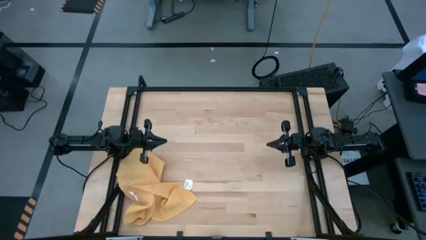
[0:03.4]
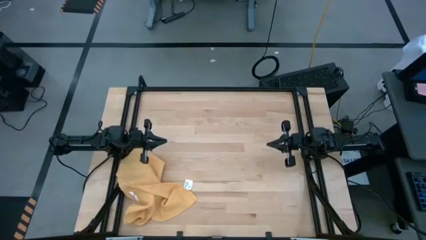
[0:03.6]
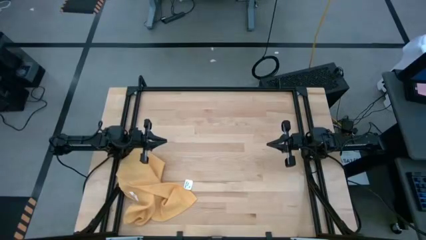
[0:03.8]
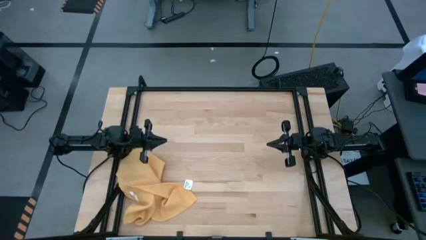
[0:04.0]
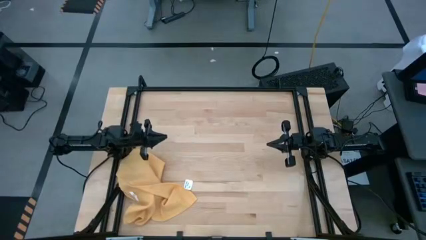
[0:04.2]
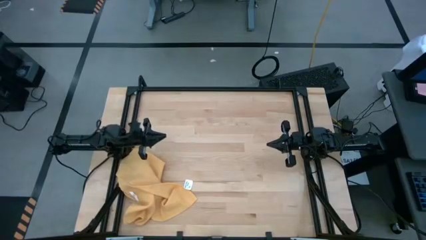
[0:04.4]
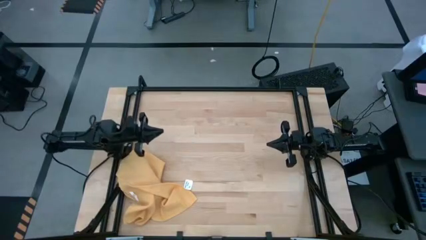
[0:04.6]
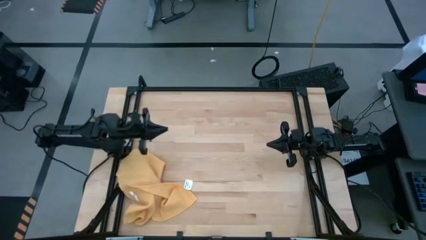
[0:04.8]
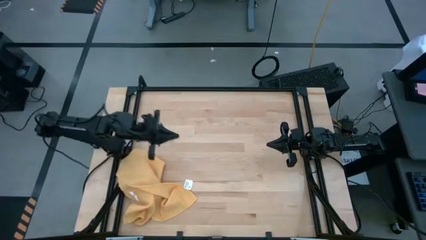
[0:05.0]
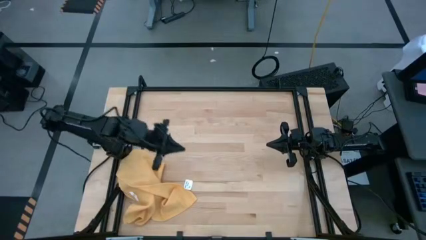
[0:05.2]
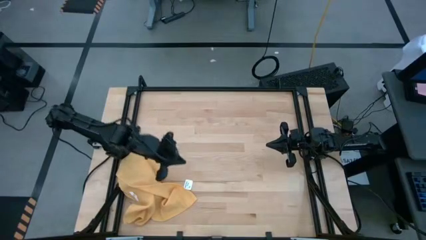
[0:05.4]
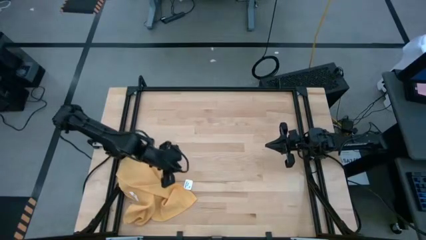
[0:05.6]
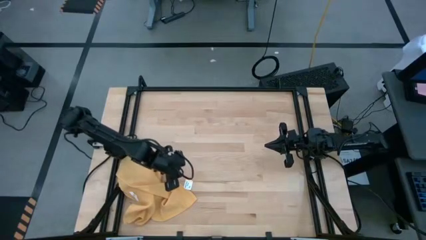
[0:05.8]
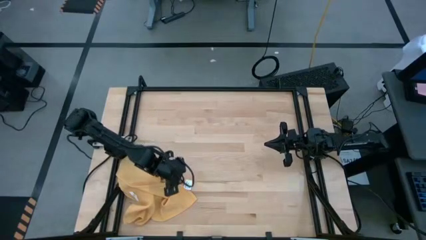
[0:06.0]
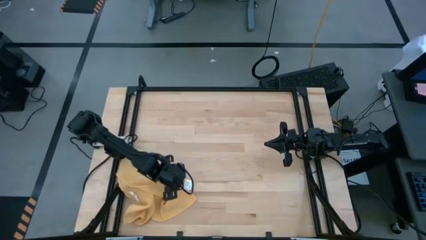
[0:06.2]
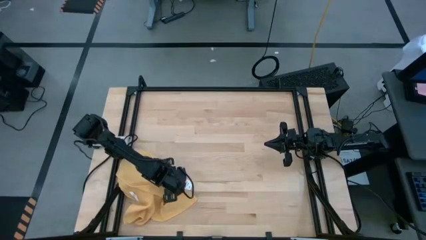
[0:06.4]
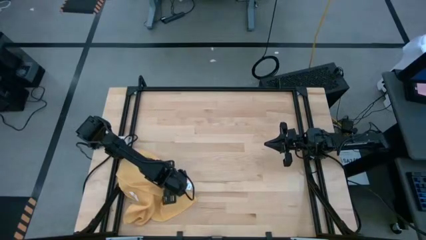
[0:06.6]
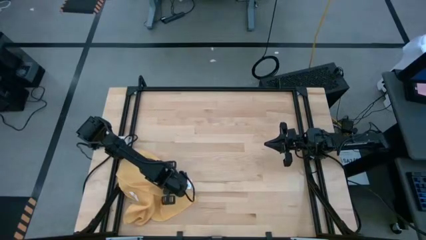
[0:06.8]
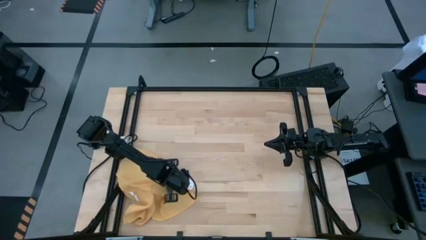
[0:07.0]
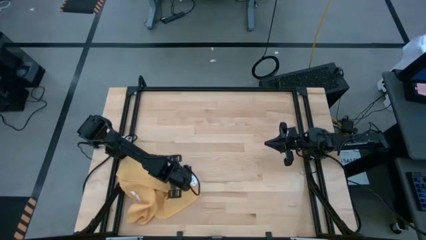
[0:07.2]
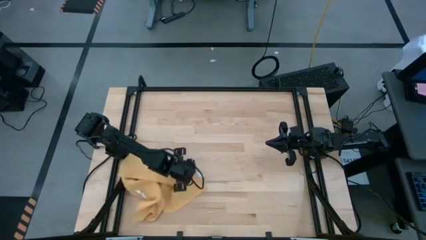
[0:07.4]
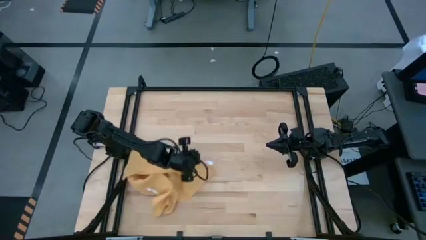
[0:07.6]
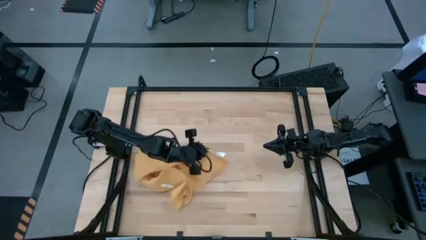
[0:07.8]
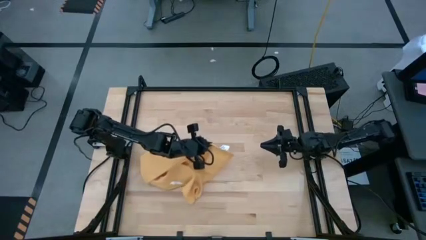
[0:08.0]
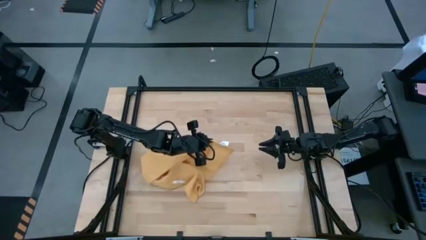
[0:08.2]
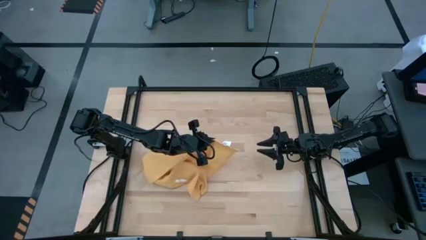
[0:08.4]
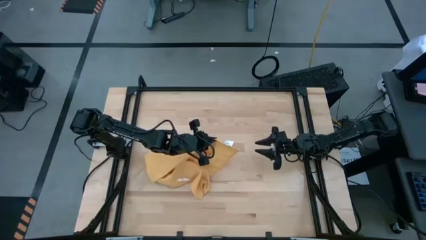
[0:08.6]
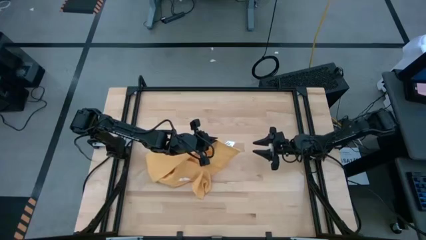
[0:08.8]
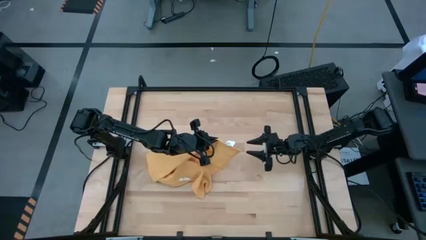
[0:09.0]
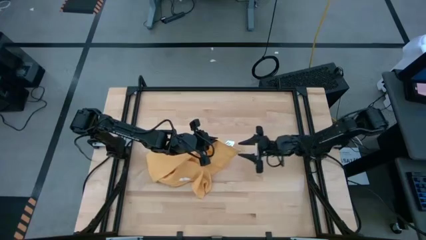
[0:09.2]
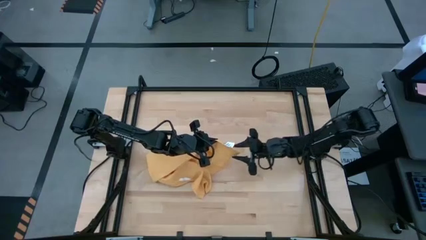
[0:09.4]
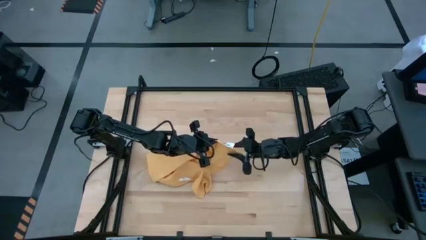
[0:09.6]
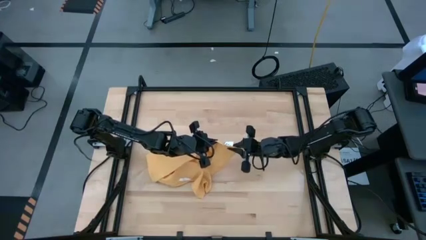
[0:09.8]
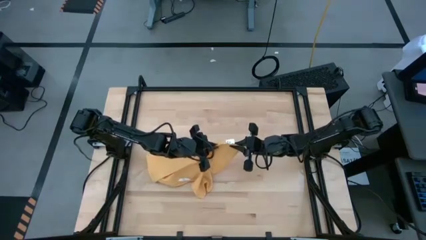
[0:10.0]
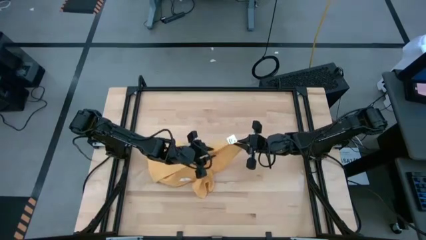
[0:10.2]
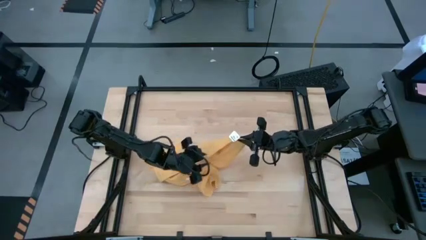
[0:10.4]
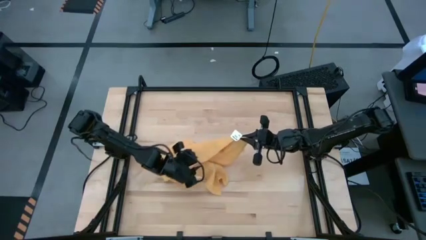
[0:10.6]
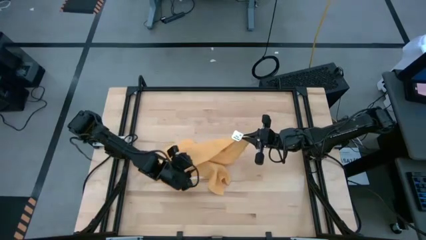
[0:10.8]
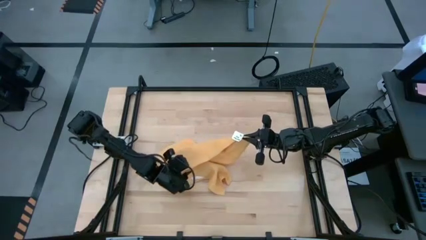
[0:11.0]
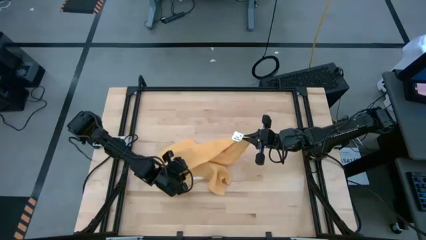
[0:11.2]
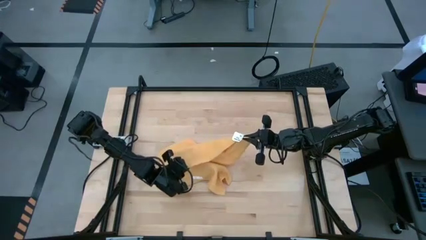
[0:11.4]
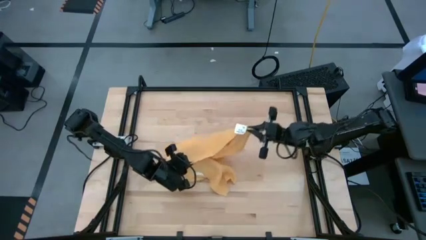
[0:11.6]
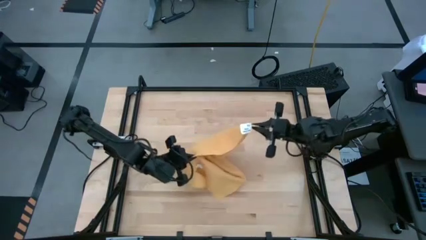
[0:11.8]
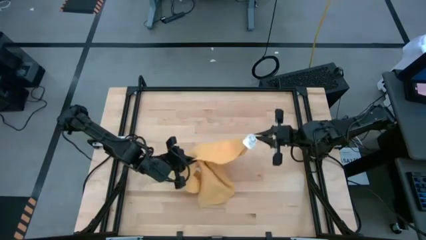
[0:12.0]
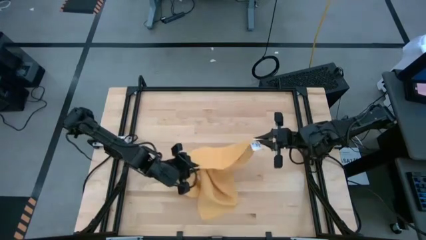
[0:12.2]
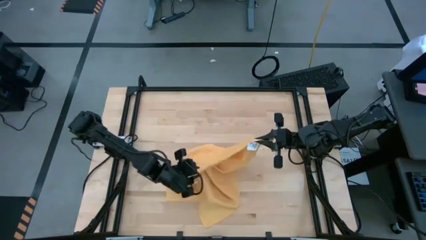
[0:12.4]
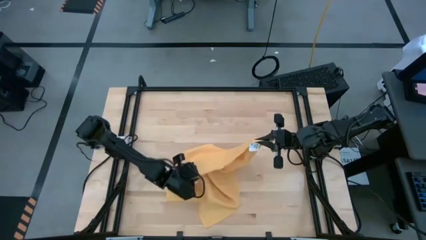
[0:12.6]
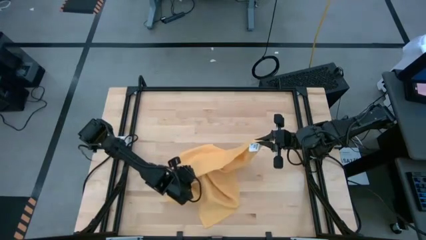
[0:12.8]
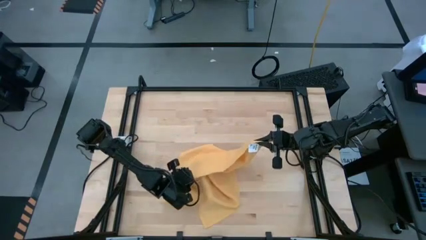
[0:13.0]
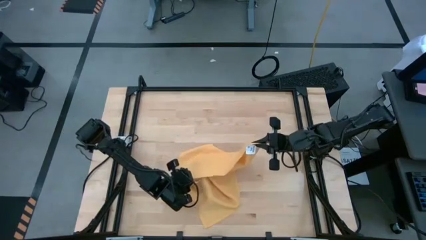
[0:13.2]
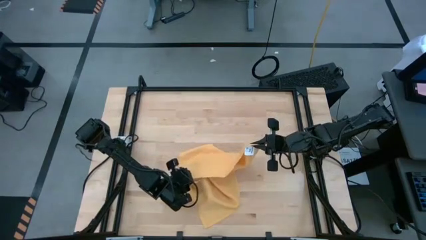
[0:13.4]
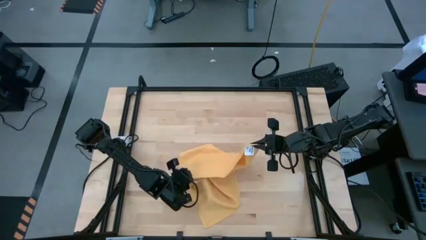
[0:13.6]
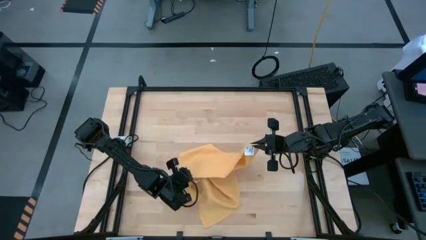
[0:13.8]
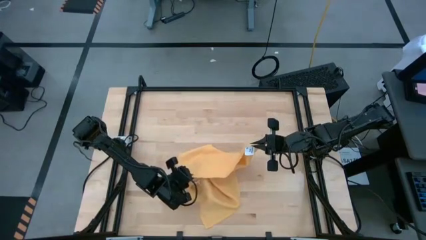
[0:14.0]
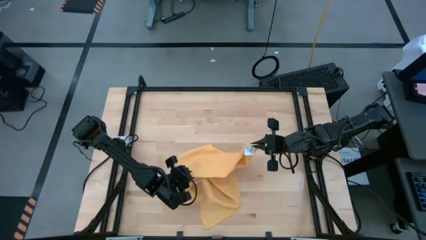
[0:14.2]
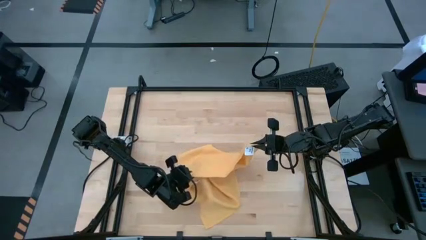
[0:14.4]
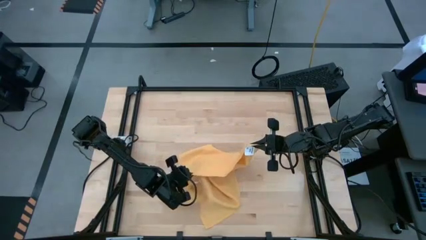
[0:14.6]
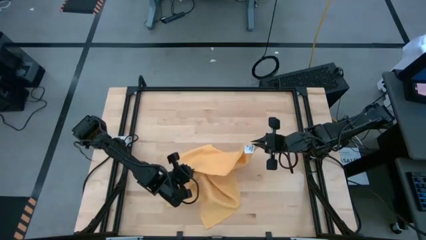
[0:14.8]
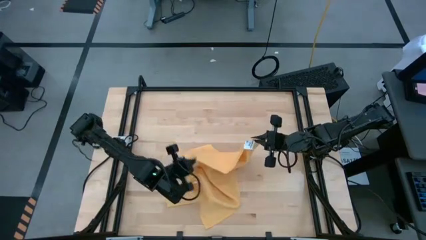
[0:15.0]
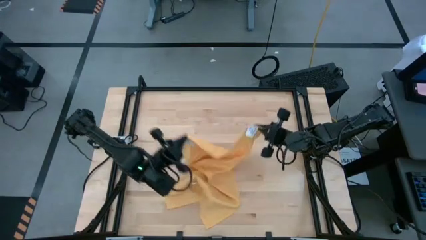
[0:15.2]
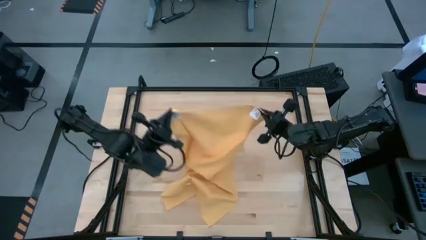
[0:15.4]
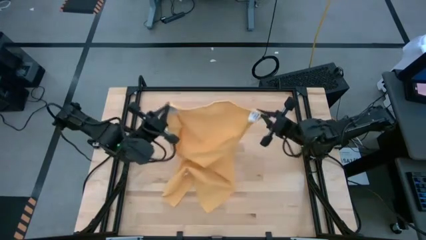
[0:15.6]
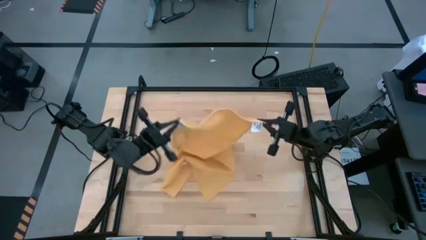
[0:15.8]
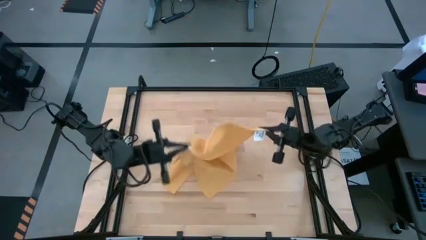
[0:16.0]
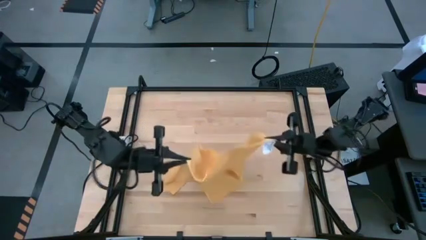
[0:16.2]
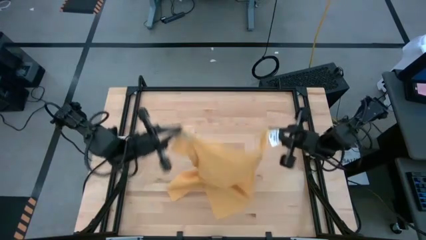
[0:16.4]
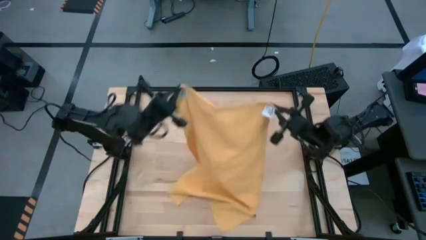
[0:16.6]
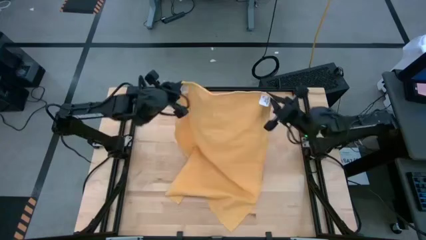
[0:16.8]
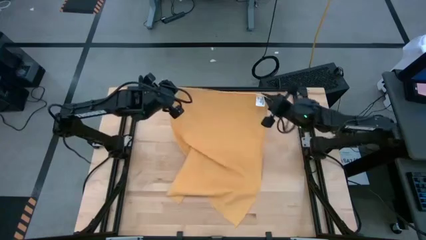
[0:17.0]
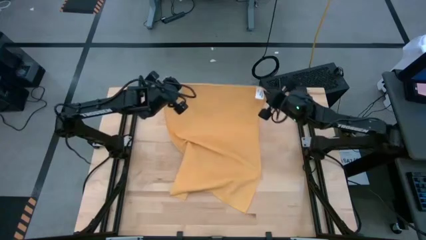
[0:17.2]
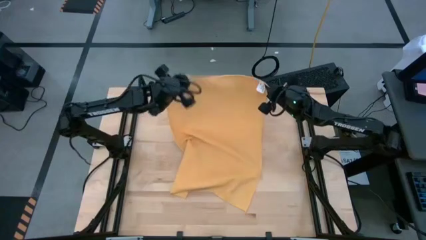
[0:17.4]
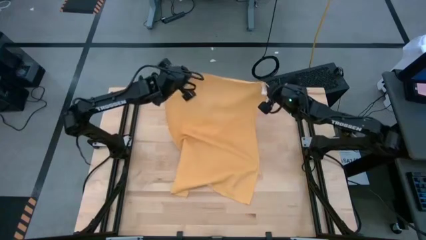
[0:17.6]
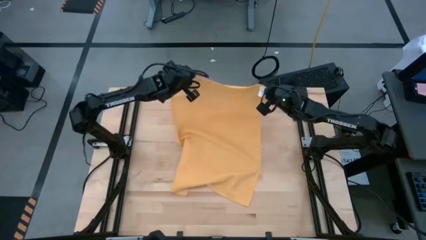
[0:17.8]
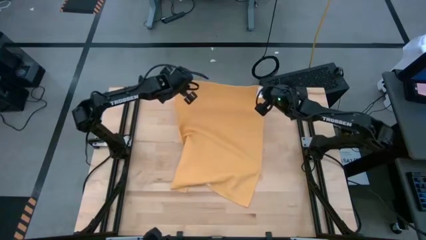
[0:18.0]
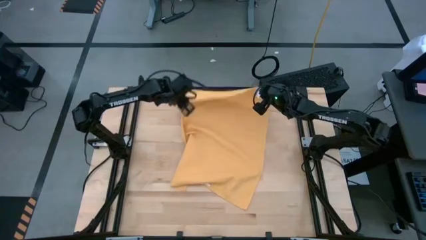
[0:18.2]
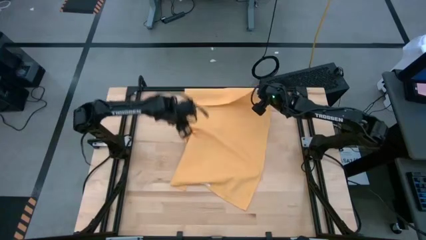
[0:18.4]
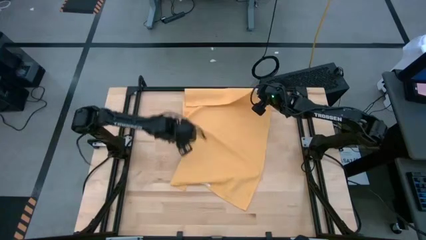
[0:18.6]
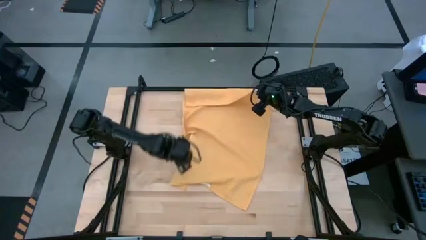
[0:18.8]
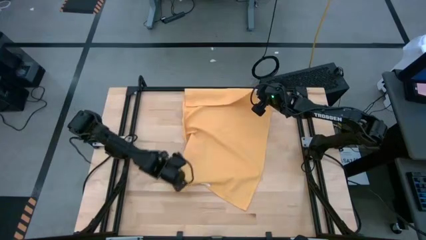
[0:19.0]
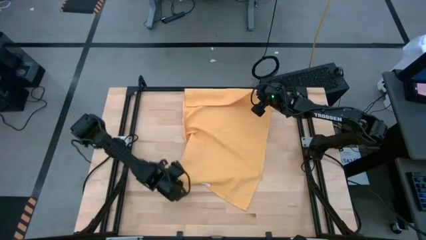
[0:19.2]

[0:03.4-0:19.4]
Task: Roll towel
Fold the yellow towel
